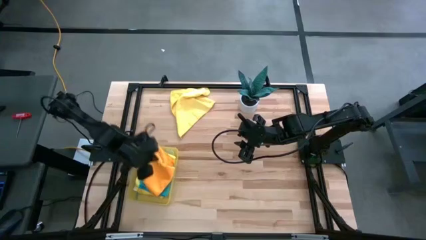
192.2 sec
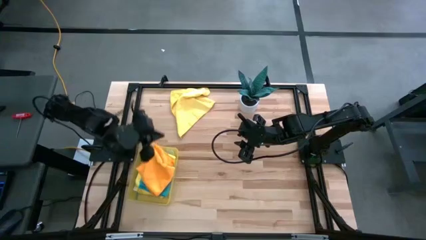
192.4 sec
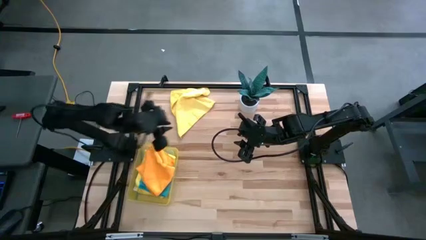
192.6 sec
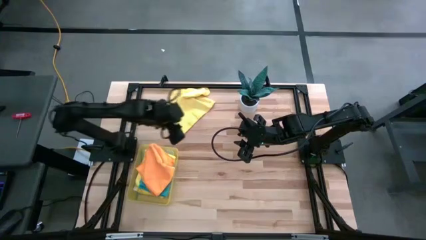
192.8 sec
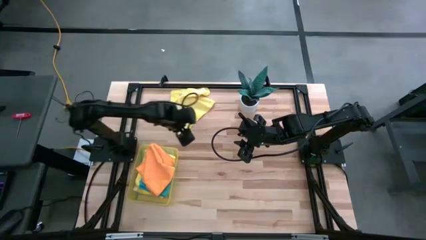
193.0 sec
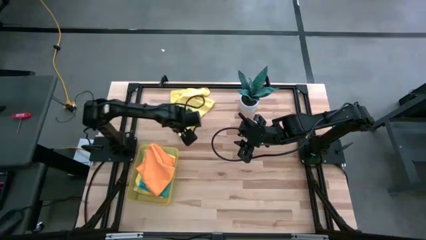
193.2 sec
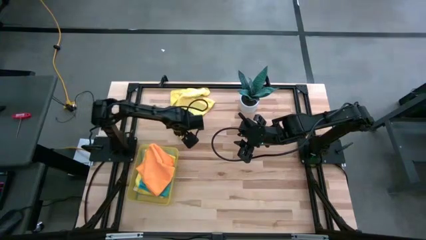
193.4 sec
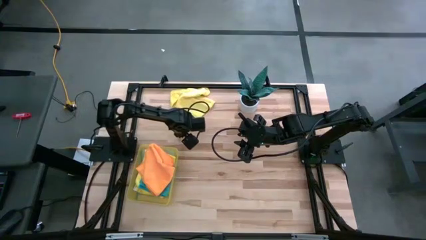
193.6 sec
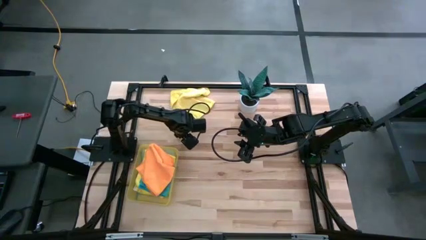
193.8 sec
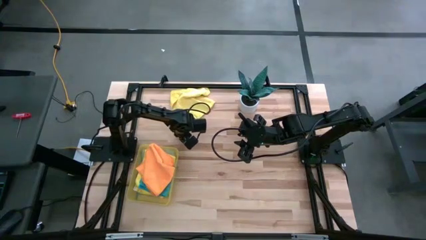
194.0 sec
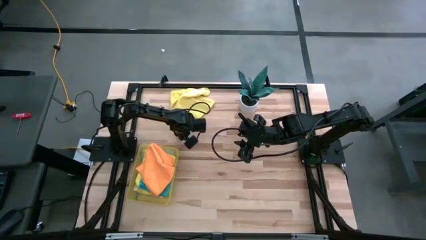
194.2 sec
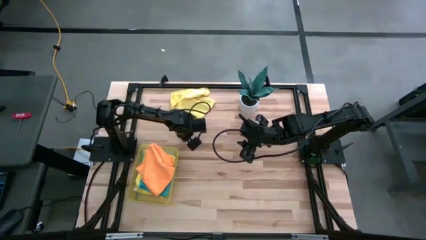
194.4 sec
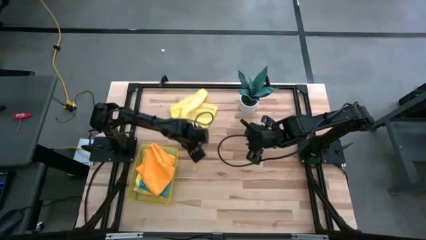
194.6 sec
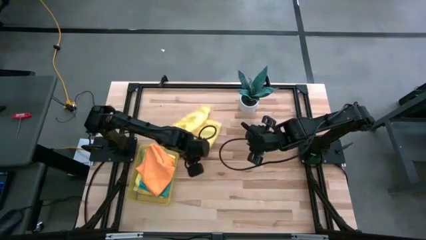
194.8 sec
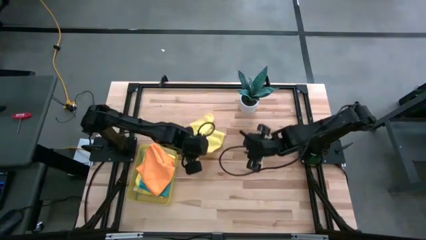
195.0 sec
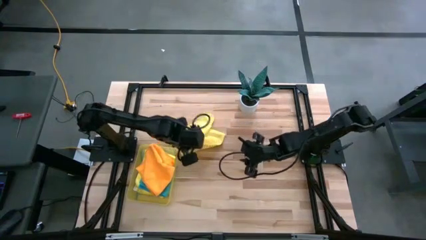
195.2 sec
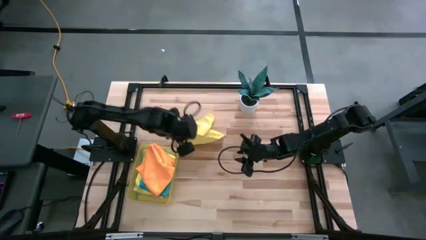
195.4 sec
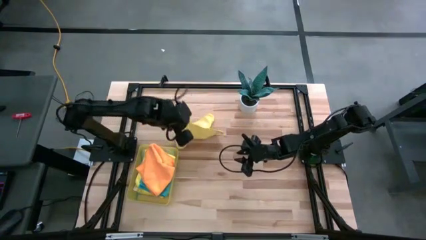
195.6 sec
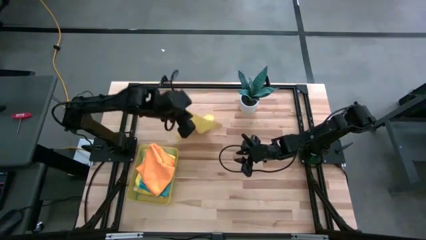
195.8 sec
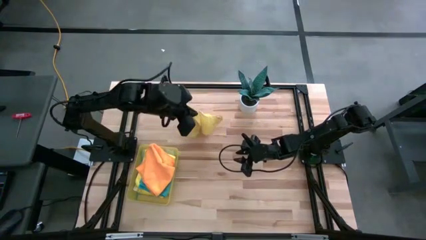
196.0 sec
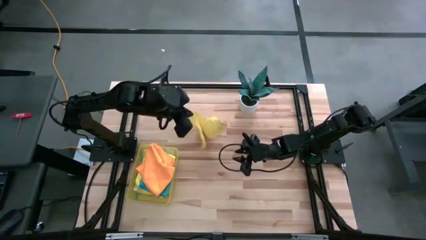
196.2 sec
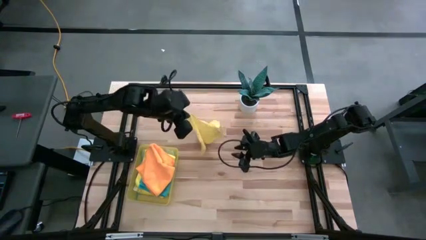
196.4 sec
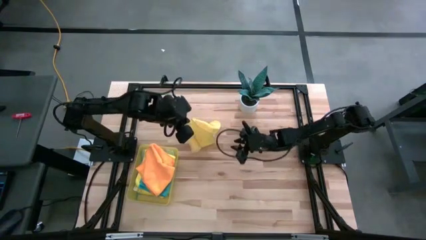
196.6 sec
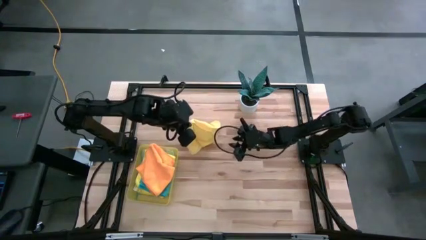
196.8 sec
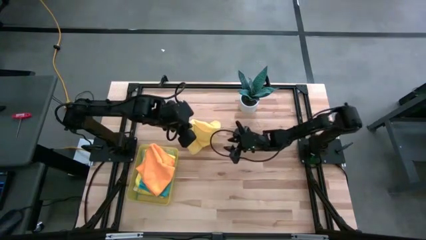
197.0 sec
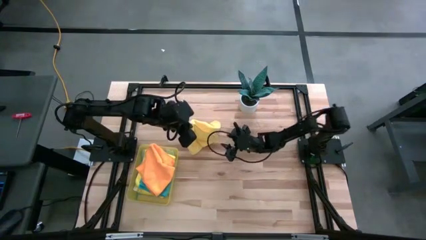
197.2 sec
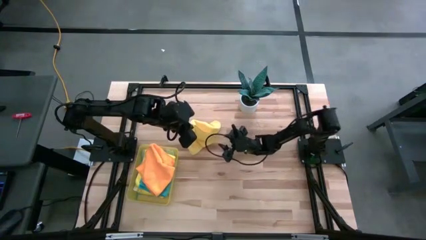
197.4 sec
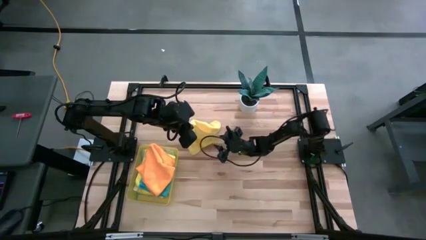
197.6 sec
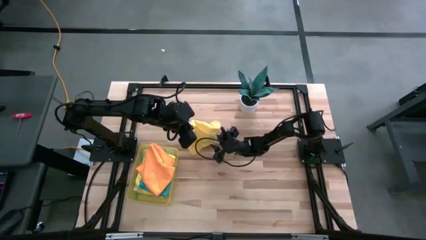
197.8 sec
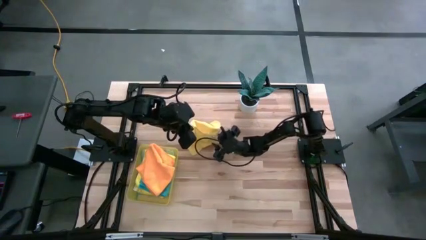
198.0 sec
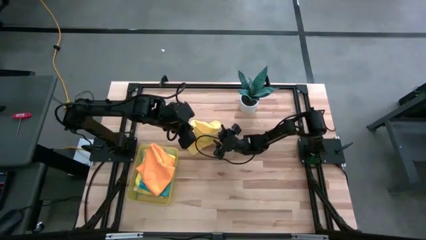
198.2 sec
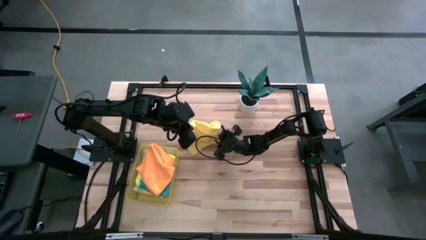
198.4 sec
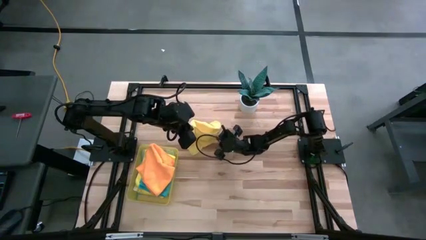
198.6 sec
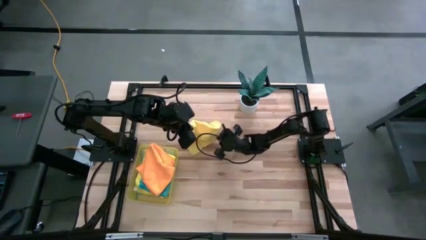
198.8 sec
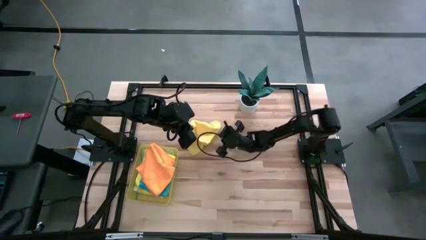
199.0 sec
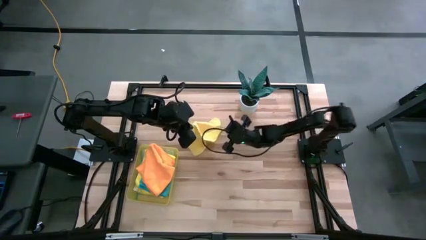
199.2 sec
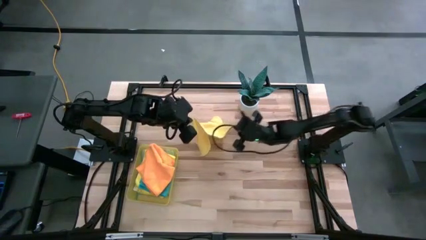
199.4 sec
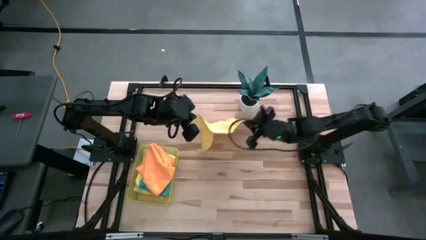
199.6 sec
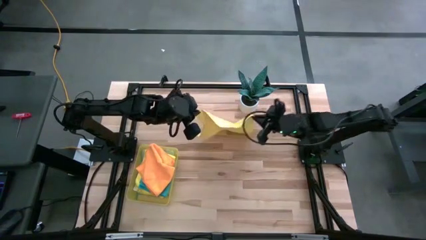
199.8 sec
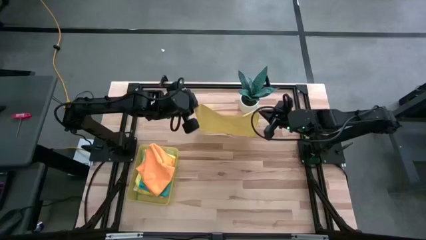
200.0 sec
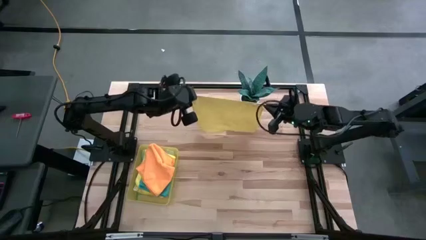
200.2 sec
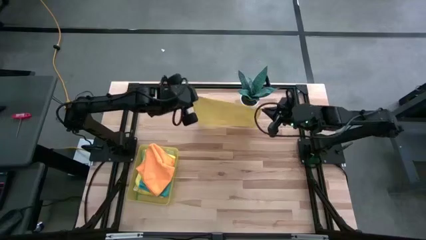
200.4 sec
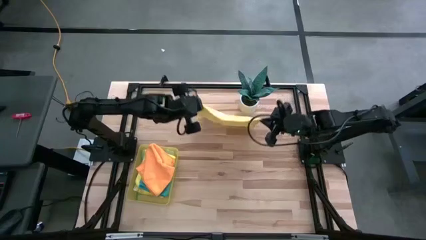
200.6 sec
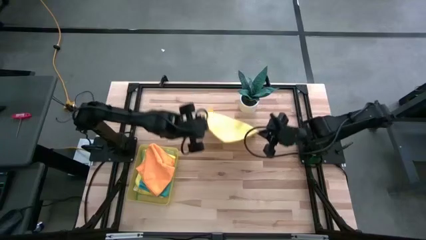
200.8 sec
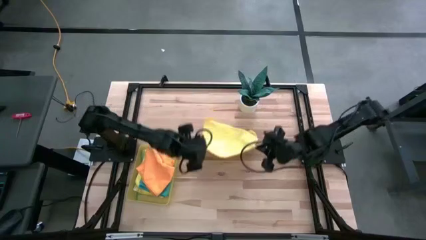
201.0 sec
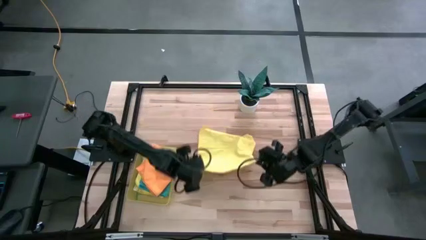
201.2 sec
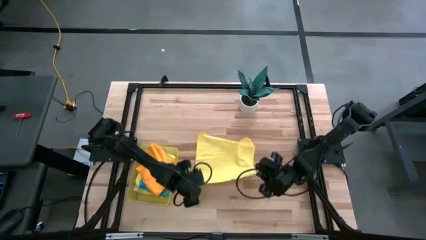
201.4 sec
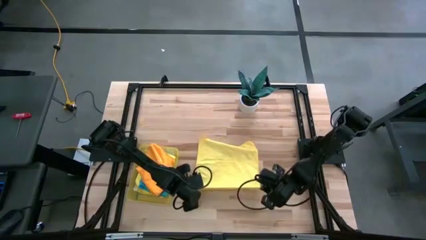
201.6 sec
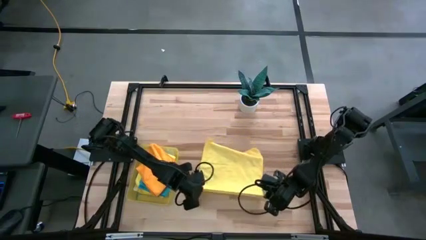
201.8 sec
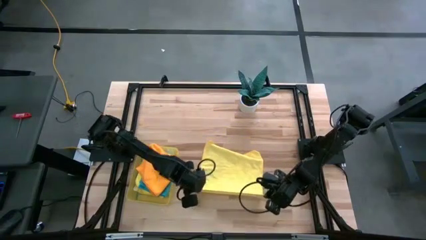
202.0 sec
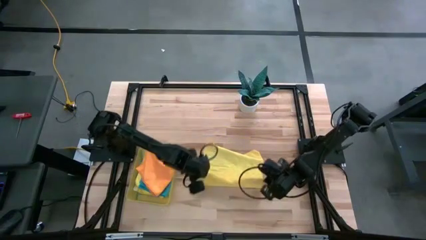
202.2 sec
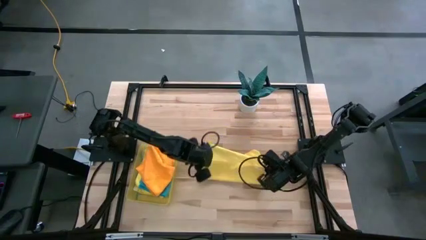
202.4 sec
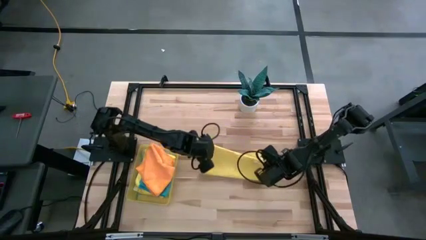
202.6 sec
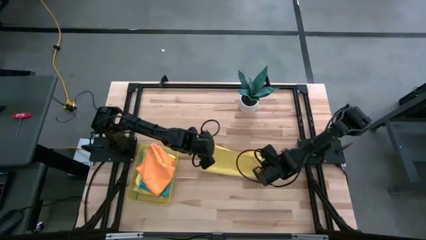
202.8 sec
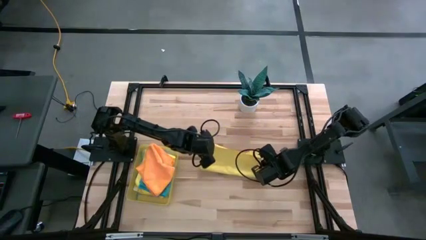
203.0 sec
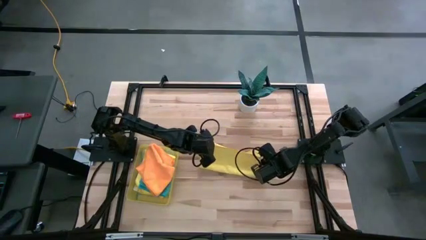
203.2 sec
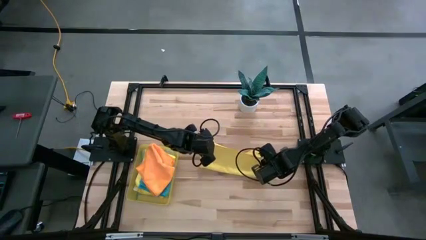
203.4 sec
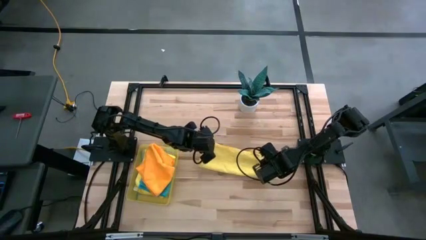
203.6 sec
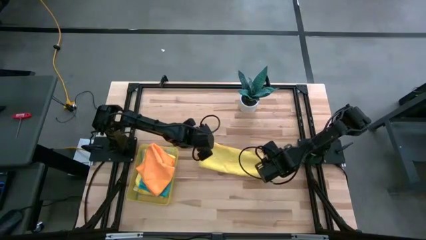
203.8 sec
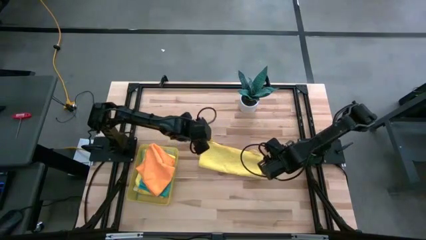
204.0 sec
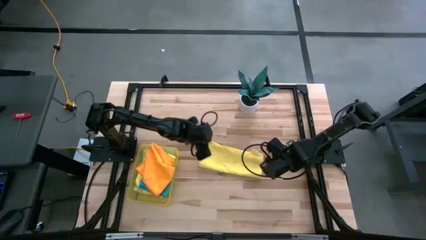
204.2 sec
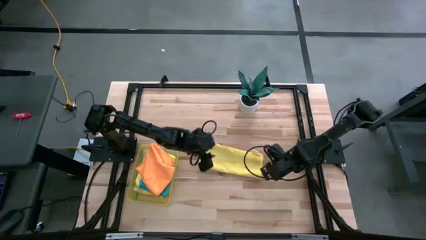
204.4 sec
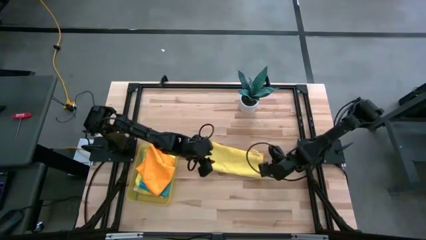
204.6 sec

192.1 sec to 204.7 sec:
Task: Fold microfiber towels
Fold the yellow microfiber cloth
